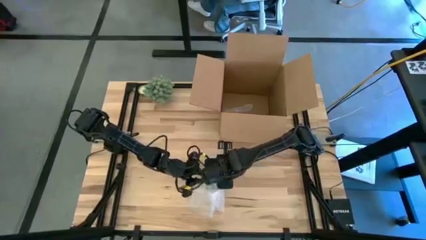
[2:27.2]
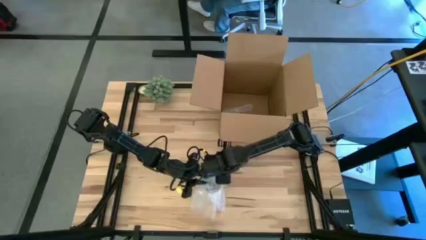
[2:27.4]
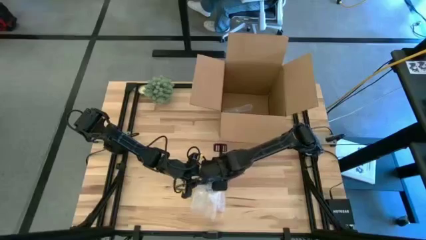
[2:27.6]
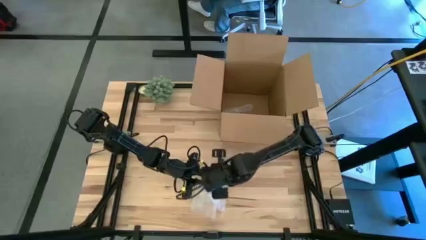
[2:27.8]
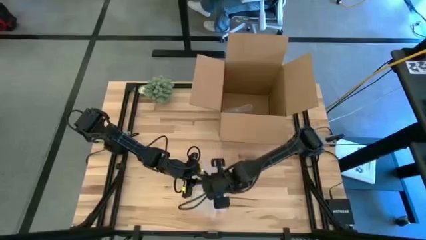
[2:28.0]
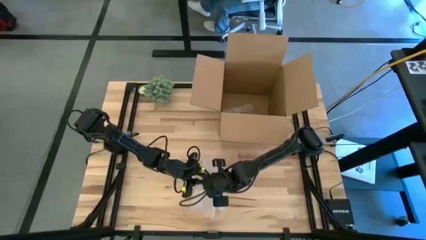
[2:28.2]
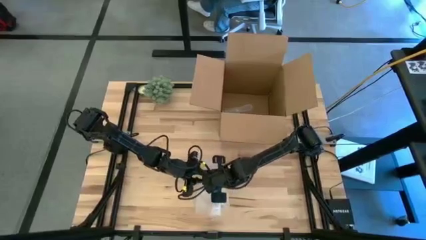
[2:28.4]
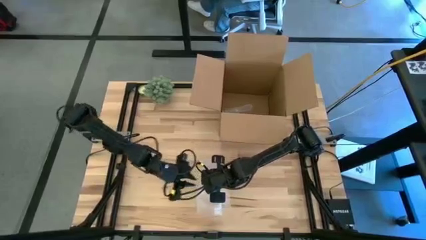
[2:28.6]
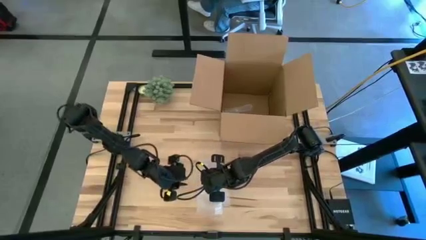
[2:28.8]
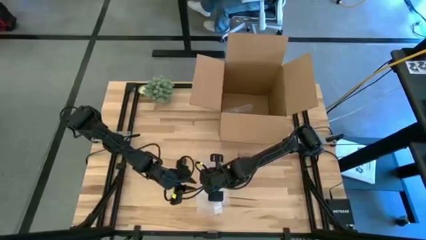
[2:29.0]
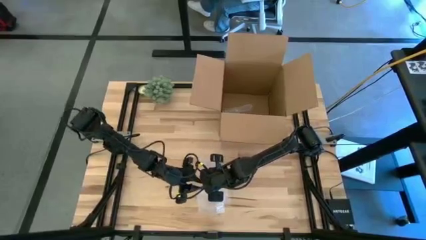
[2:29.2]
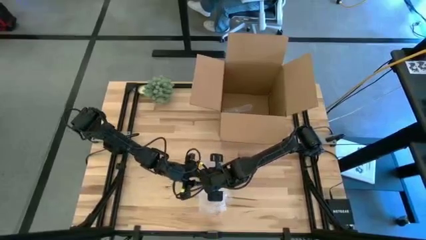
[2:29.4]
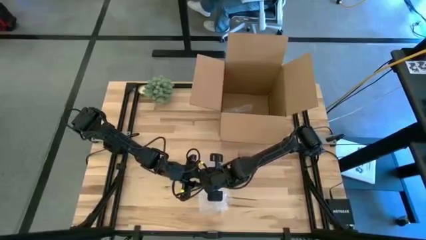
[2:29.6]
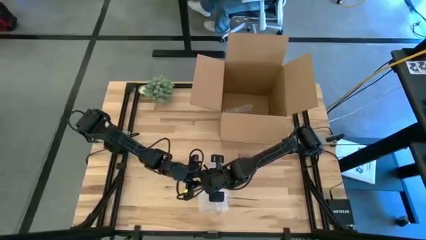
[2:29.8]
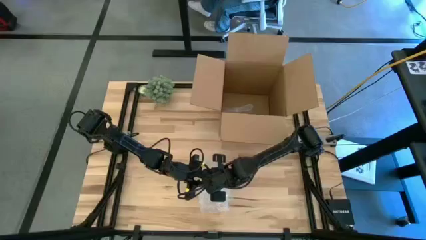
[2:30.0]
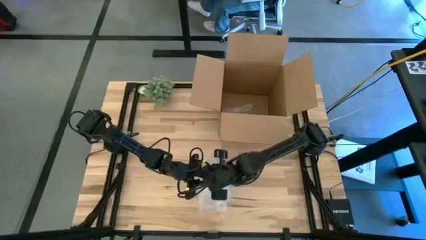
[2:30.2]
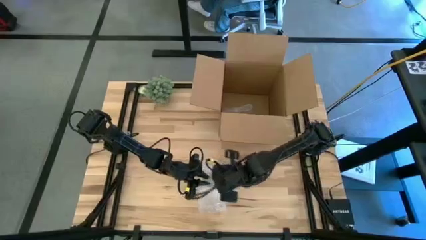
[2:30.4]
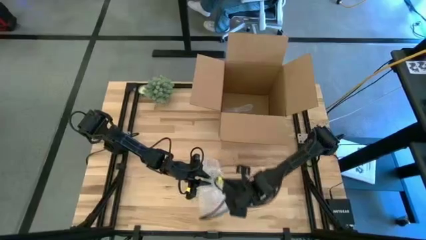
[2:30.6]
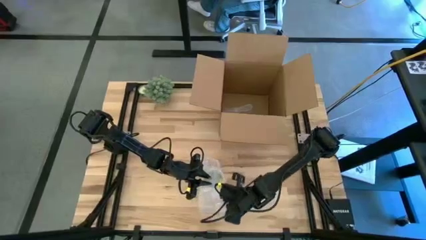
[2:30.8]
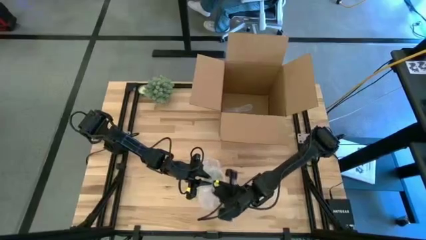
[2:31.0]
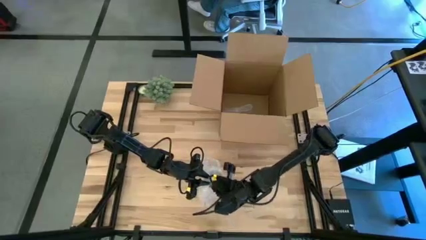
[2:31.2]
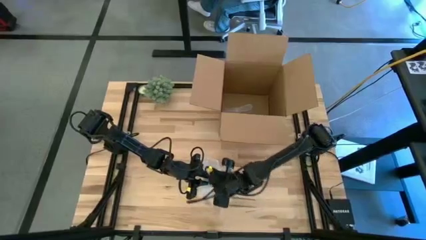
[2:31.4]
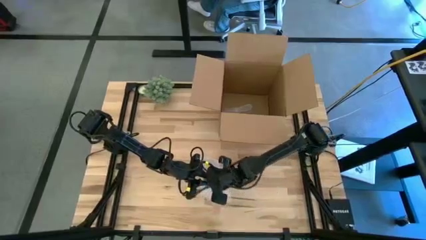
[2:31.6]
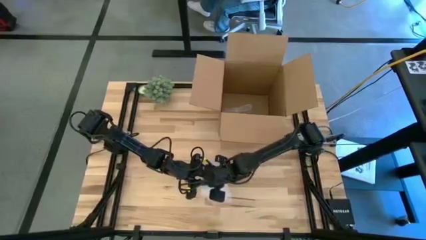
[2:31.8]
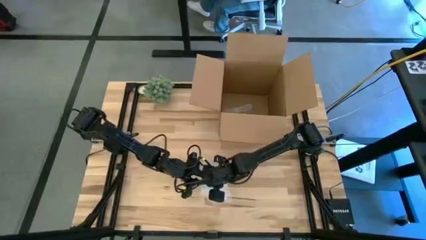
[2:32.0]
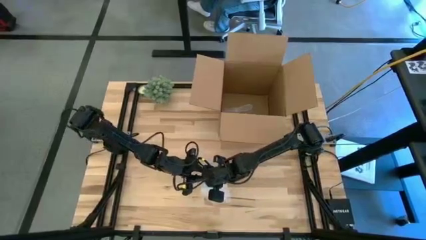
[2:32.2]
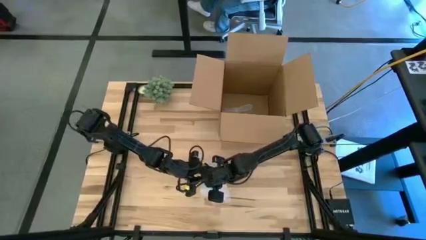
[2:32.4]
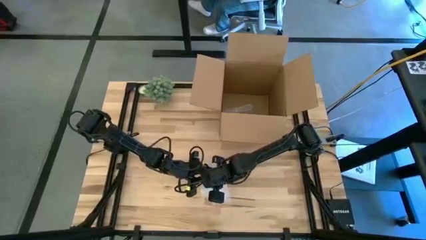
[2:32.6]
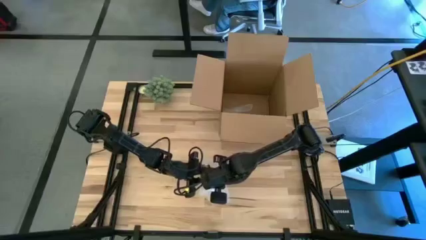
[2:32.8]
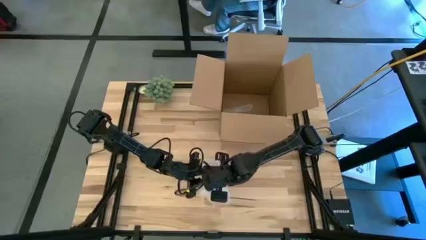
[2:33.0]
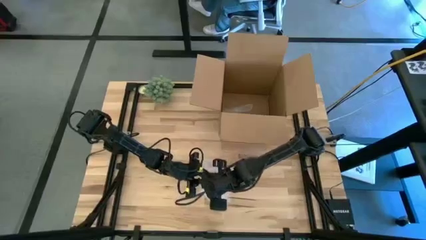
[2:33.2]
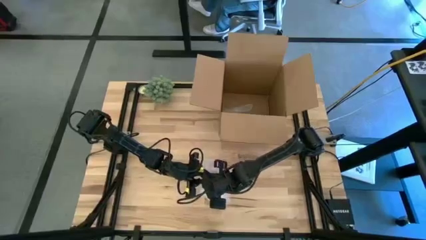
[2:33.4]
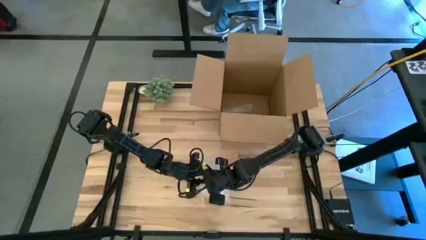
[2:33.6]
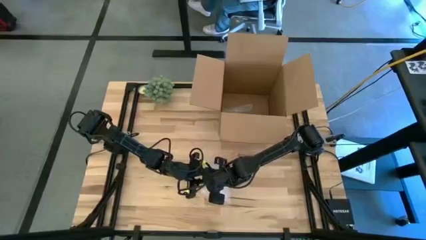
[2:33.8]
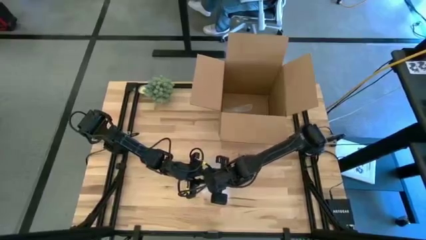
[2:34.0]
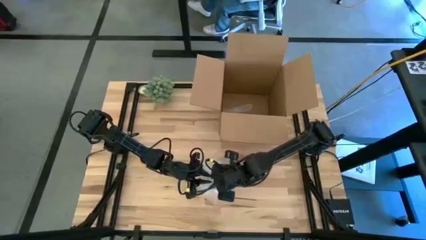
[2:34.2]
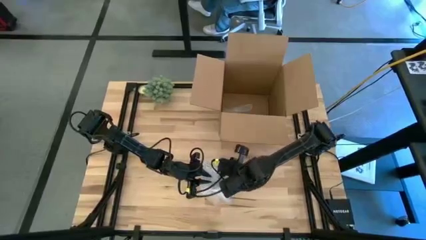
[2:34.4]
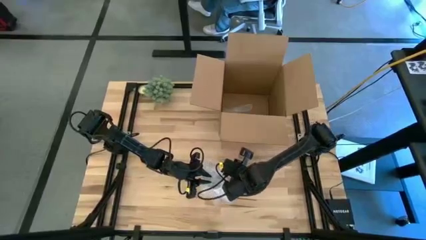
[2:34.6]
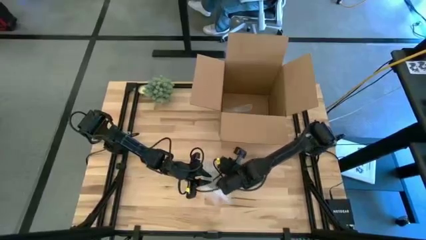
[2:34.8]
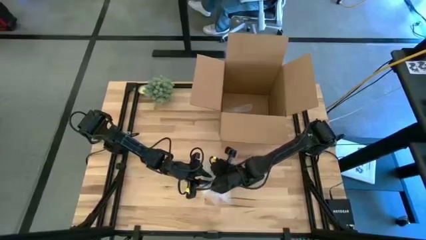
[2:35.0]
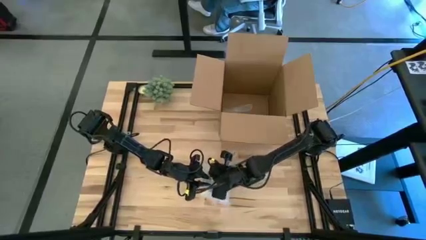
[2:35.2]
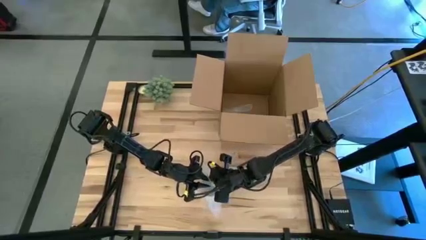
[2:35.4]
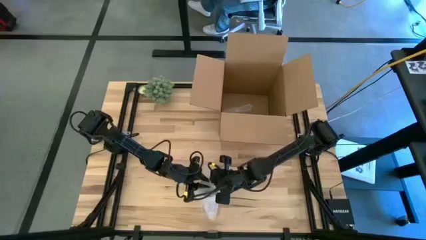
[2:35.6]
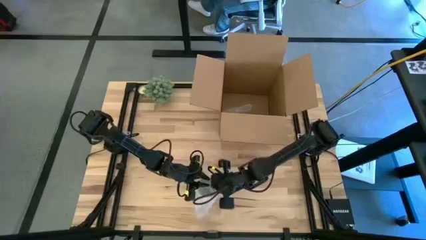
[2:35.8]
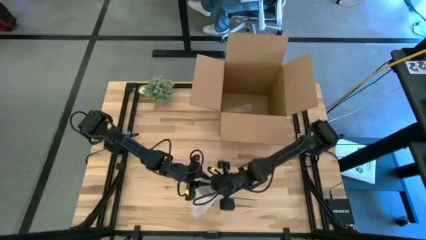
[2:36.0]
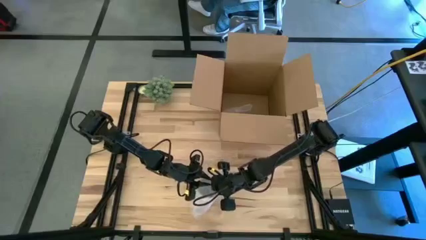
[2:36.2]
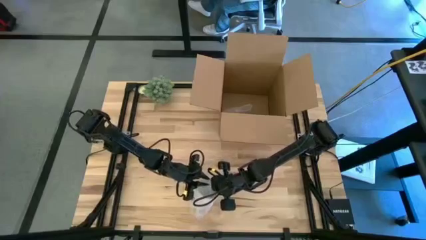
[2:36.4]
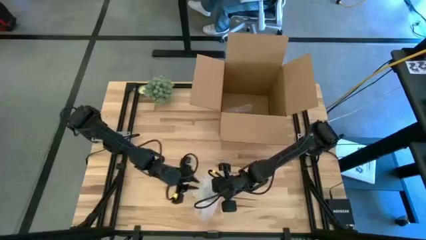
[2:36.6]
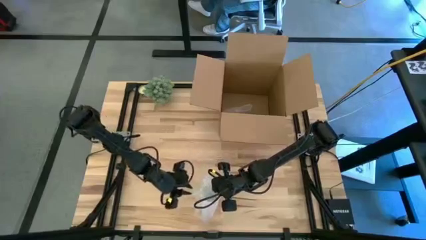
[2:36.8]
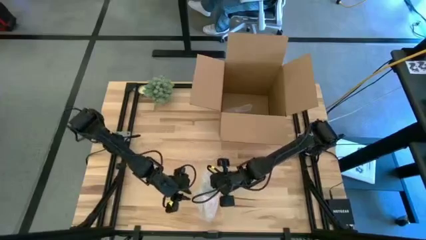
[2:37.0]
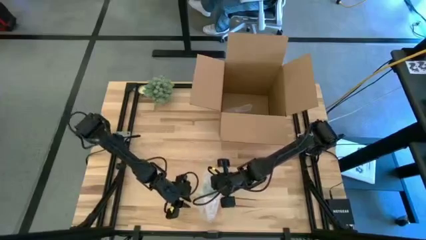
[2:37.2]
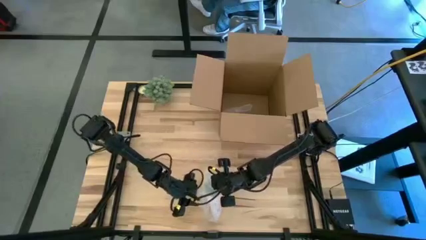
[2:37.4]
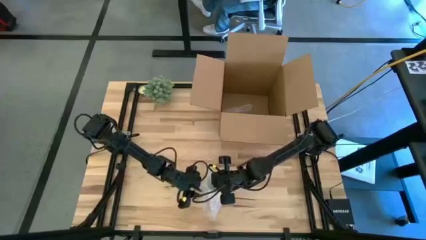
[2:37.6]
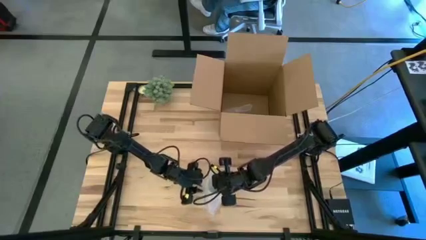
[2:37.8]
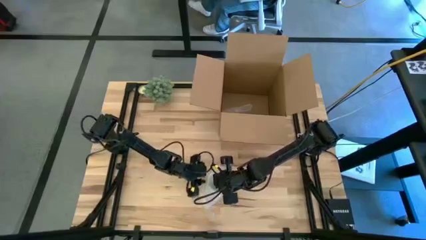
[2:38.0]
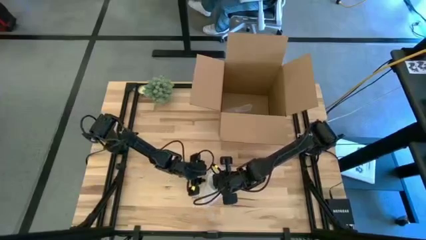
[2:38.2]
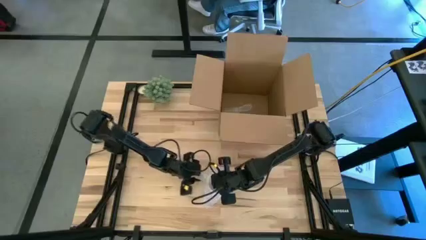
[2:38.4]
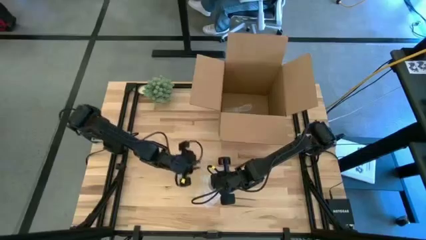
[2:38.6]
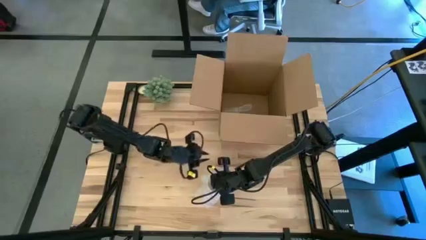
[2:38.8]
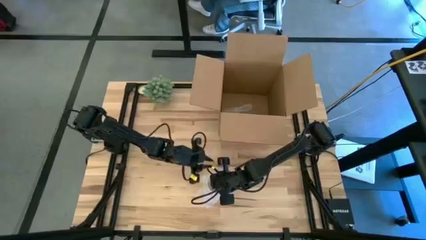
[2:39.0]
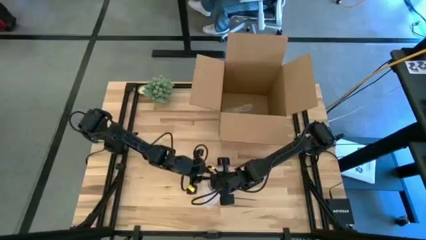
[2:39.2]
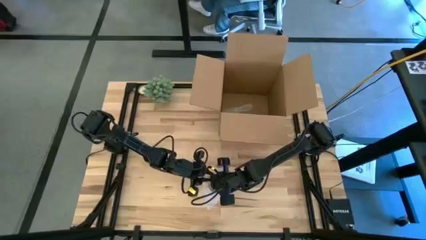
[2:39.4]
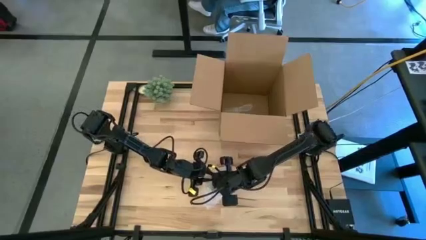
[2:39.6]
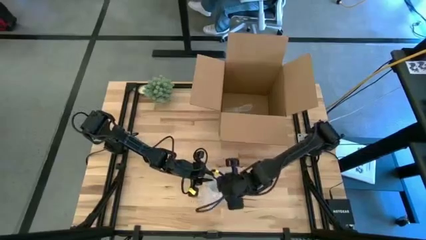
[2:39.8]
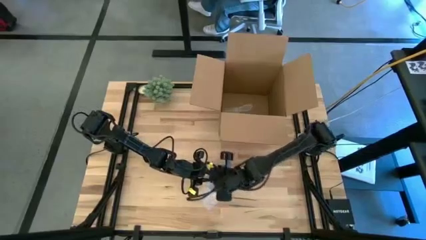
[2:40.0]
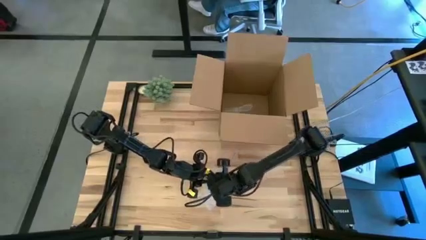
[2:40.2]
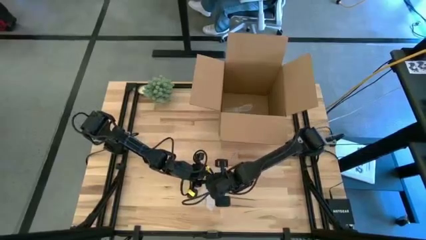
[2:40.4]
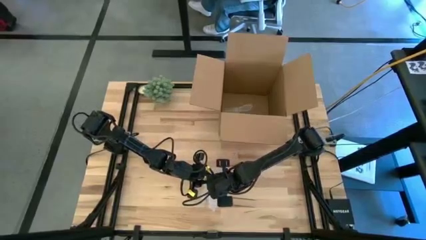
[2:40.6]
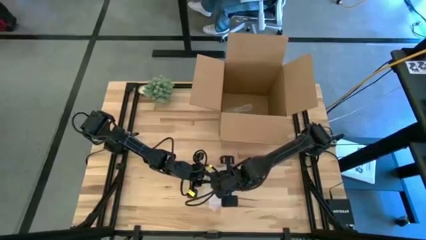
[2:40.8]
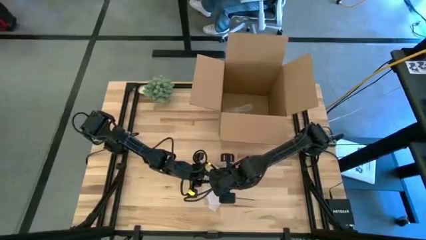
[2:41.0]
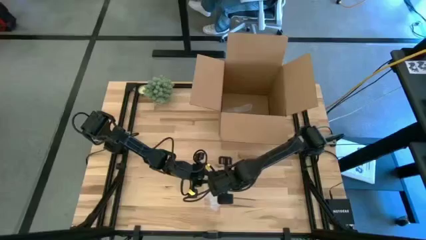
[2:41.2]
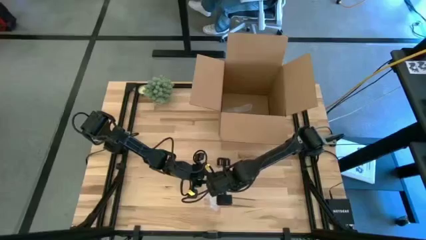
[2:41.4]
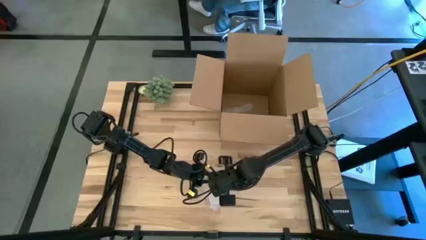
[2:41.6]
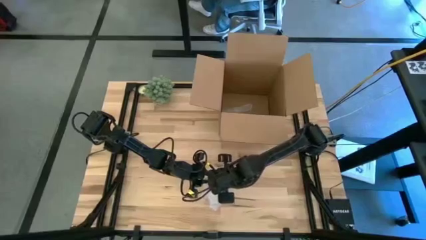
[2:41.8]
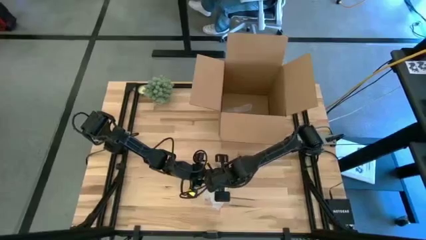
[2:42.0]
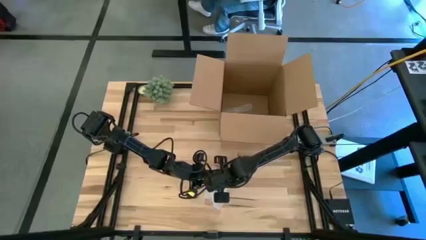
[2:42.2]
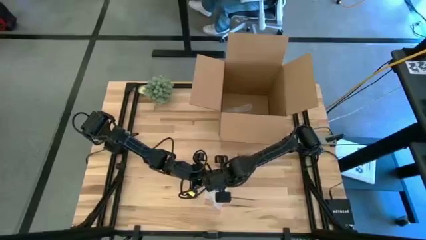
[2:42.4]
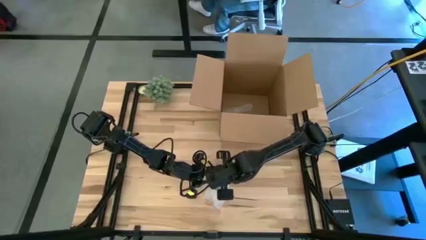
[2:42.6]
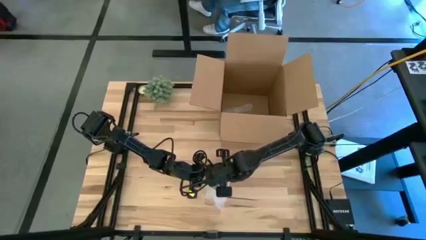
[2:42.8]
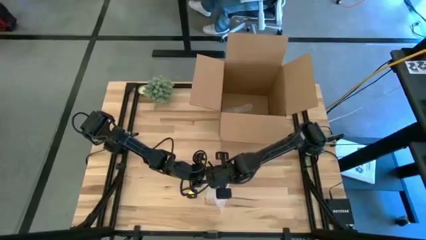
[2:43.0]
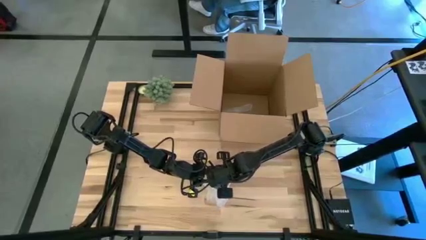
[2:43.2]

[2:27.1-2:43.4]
Task: wrap mug
Wrap the orange patterned mug with the bubble wrap
